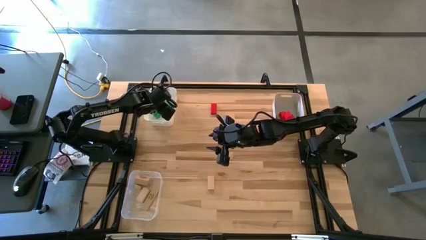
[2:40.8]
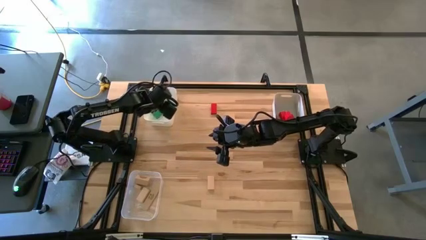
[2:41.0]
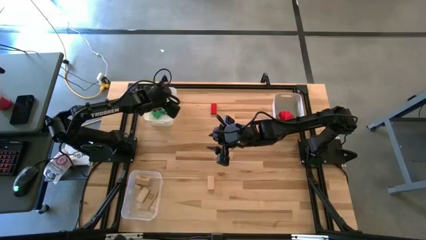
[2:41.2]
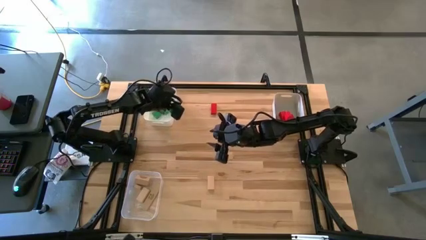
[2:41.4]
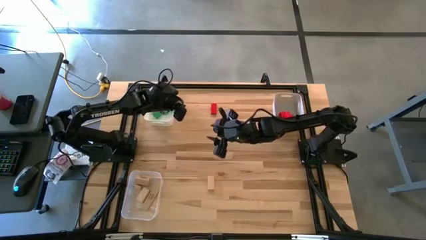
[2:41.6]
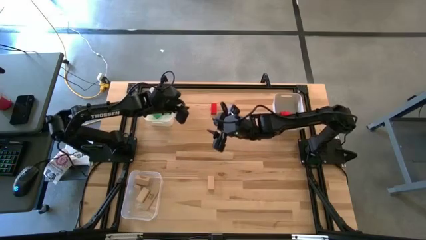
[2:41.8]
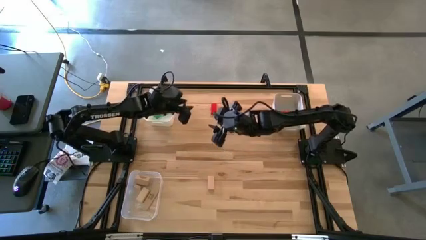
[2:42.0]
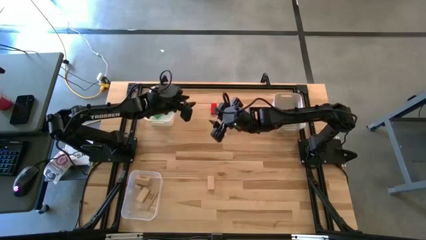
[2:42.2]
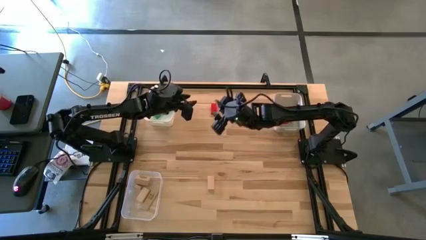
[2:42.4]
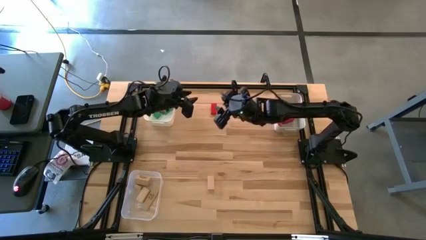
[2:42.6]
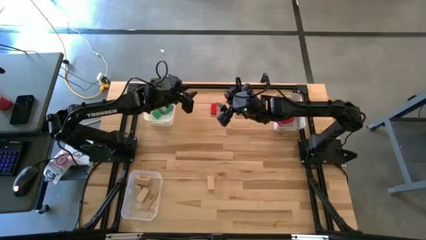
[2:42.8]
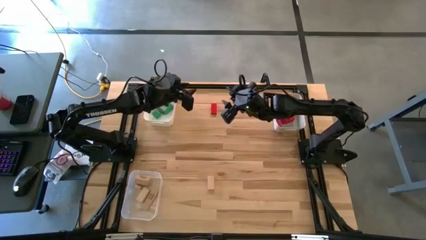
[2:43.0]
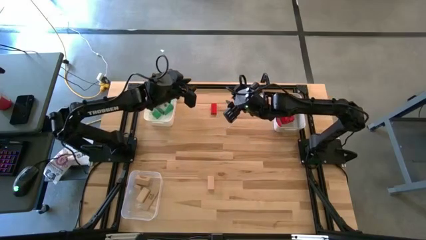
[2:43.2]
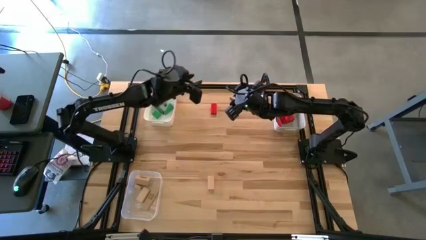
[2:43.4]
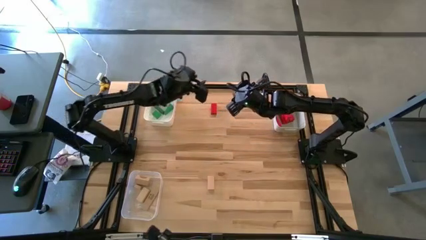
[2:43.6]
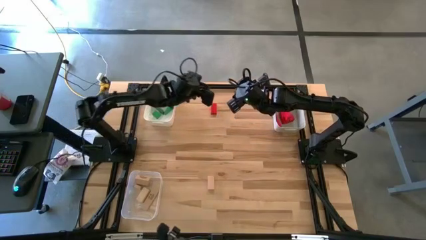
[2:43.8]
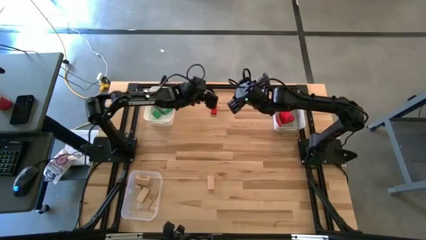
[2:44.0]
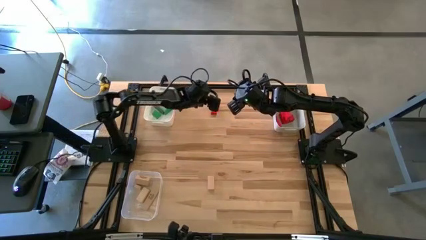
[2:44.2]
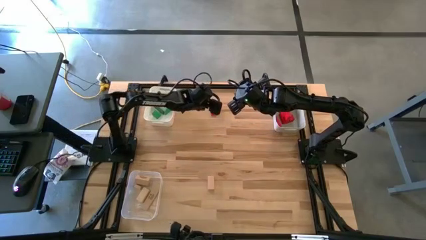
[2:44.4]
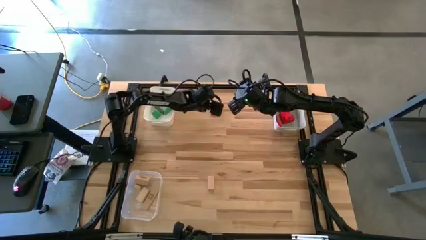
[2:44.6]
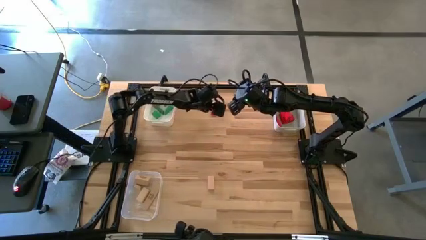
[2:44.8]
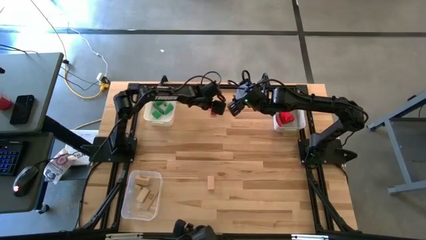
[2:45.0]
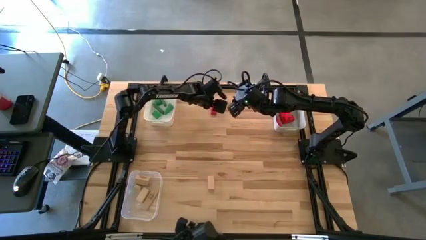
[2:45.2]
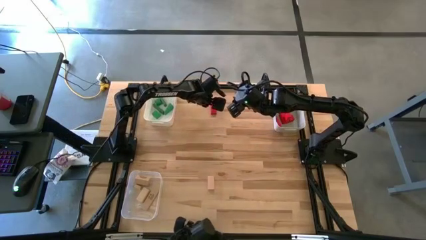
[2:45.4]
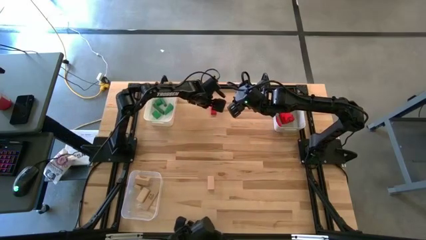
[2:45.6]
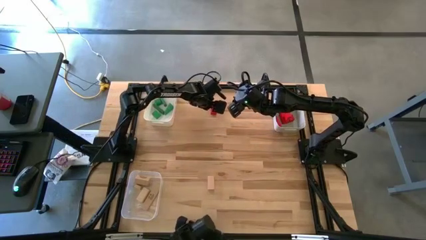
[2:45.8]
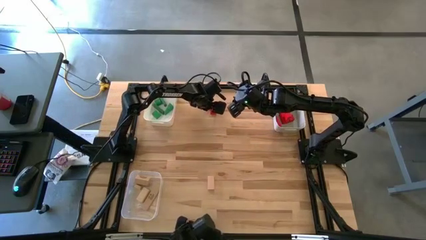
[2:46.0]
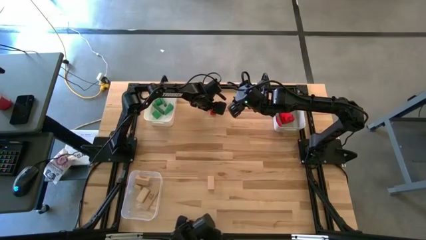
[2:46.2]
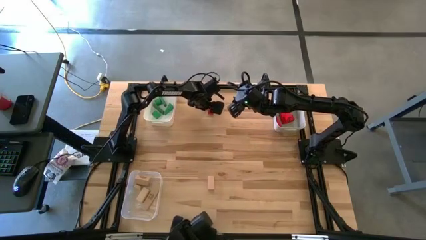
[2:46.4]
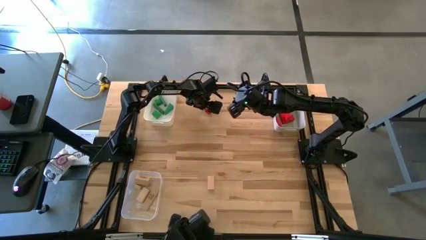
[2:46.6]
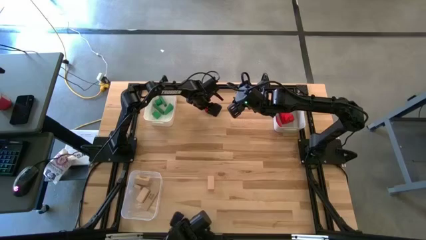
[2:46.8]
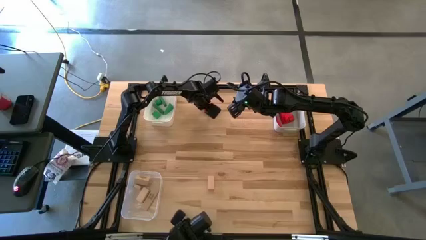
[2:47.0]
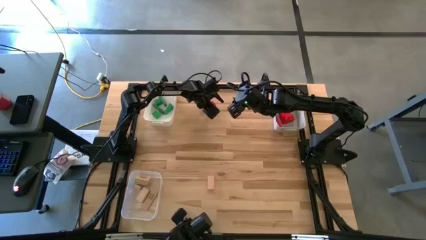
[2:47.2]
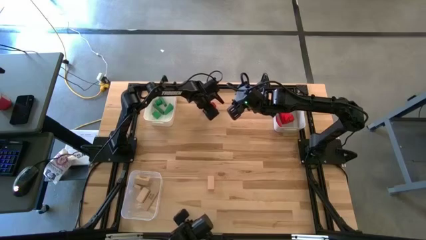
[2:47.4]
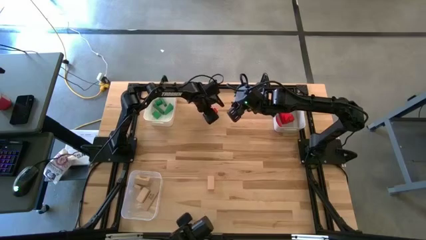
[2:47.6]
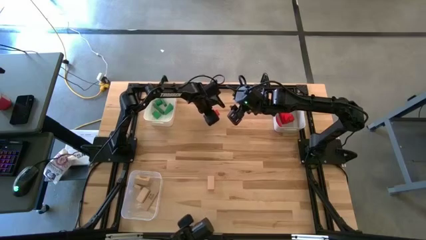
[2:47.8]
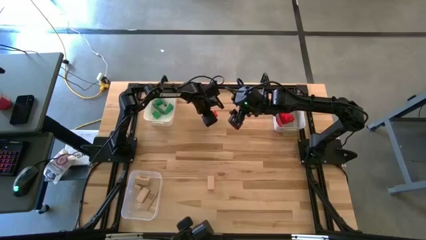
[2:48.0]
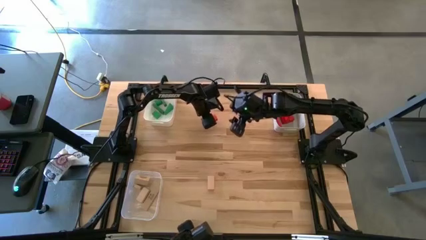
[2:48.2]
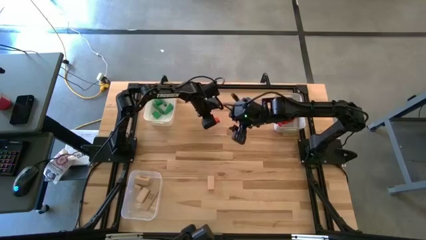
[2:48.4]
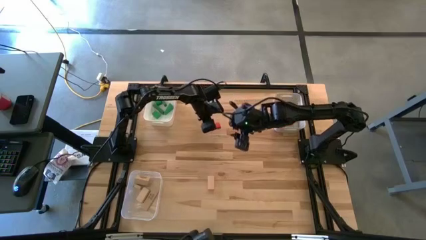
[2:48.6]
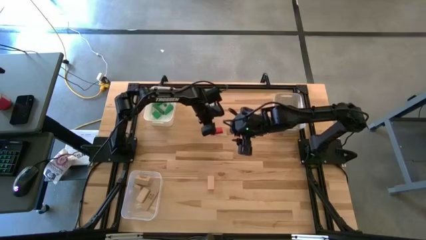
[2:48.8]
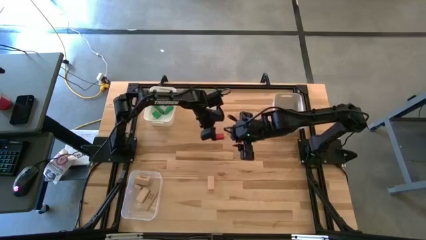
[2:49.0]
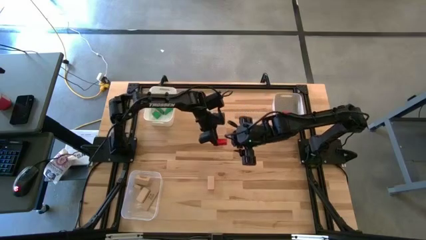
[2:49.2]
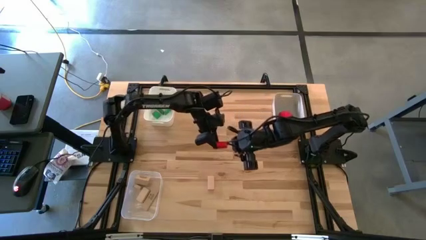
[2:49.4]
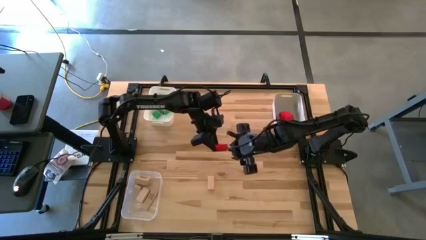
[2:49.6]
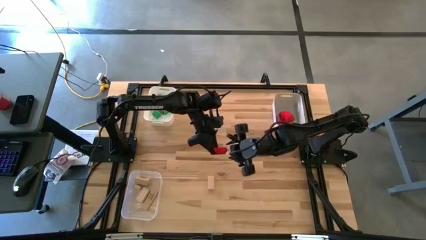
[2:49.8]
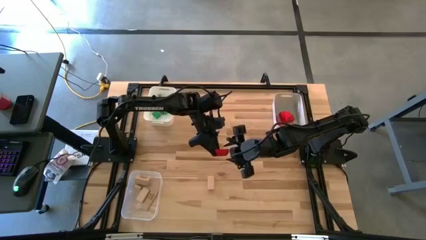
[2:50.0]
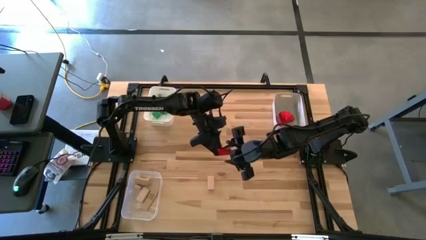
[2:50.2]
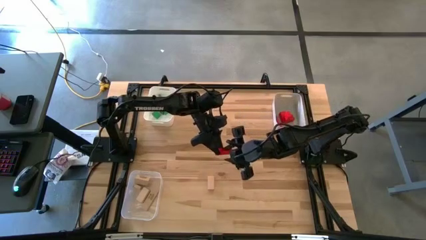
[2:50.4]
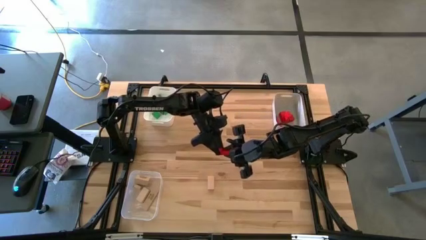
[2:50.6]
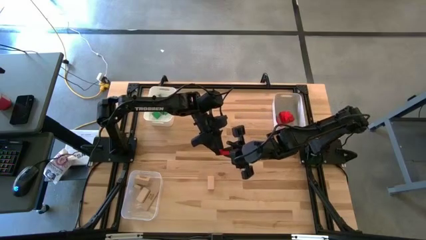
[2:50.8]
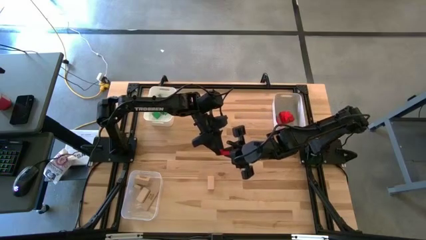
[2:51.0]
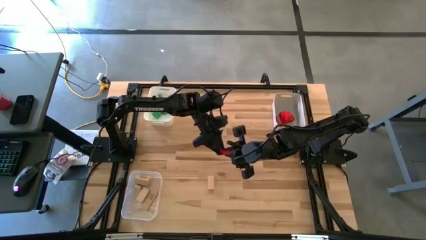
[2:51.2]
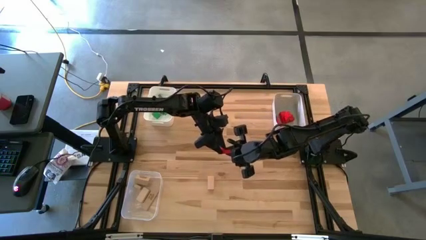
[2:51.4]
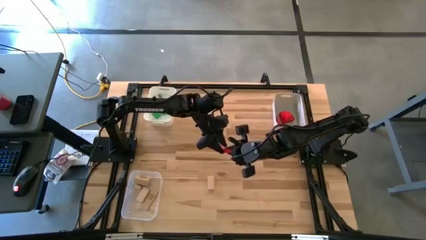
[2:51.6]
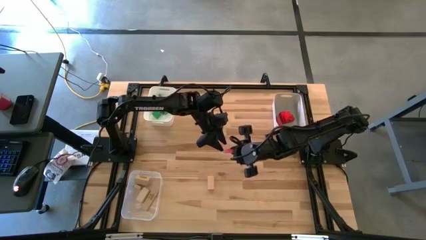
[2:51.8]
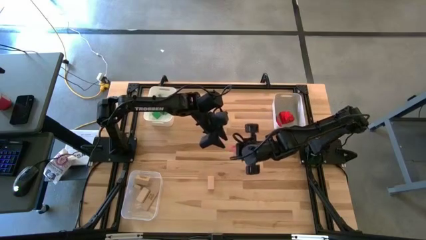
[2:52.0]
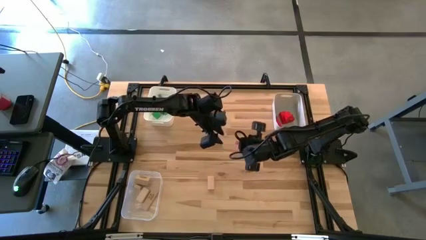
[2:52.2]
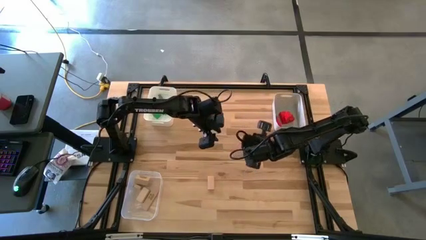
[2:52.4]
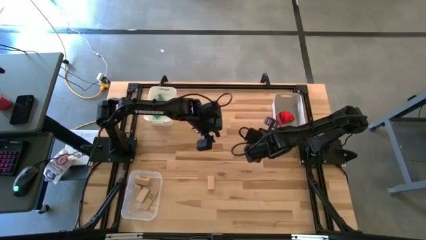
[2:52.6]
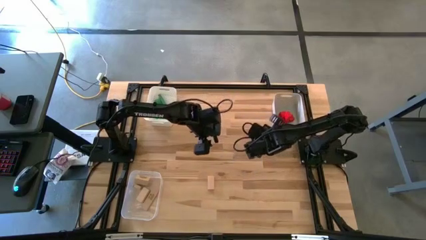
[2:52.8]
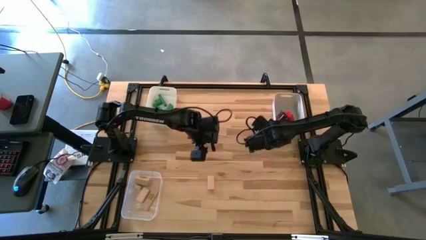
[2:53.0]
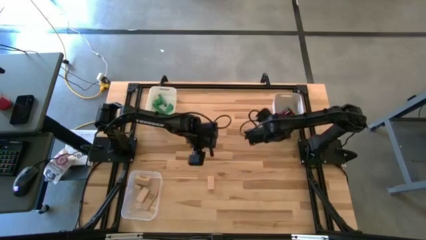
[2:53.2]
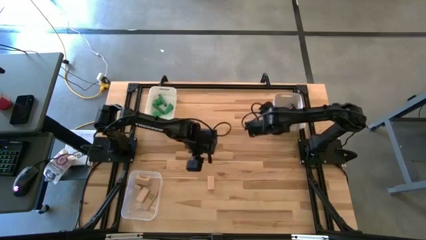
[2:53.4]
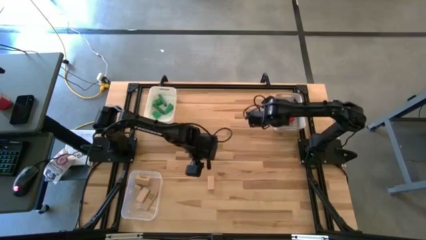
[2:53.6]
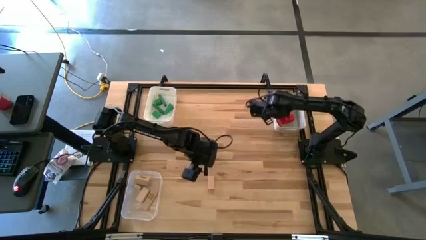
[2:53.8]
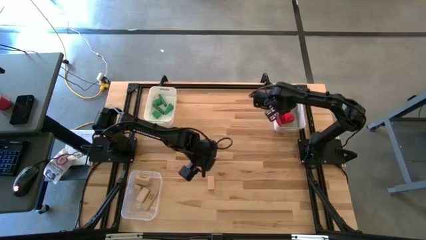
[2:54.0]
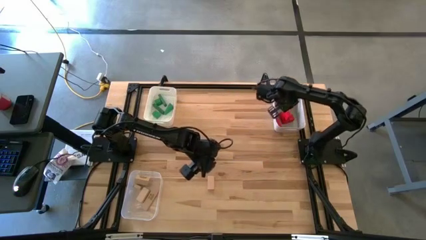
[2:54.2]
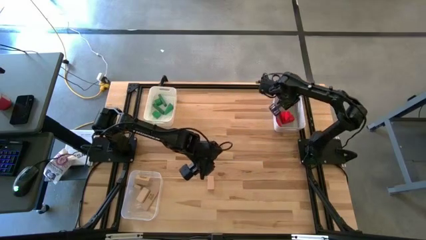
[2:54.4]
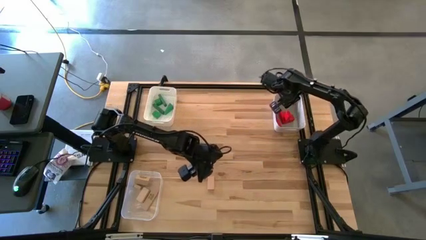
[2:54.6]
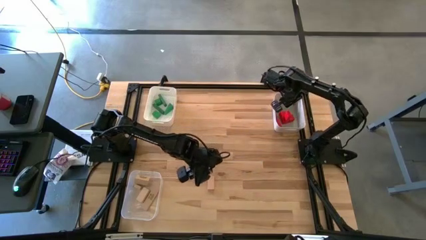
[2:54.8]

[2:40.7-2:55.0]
Task: Sort & place blocks by color
Put the red block into the gray bin
